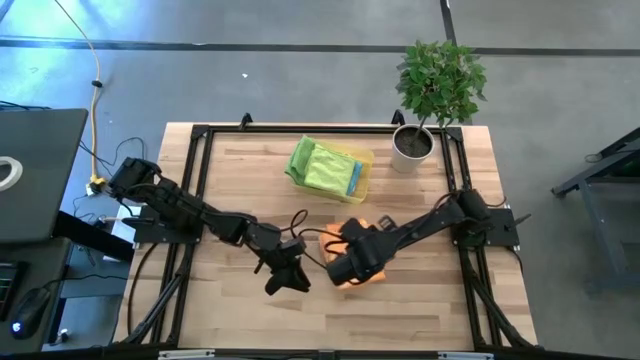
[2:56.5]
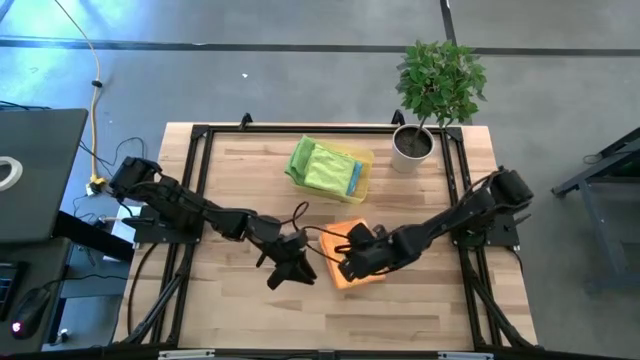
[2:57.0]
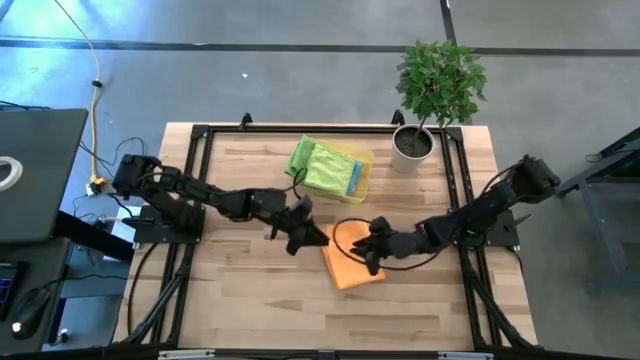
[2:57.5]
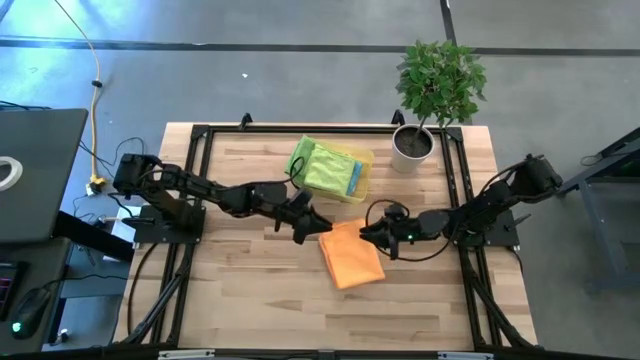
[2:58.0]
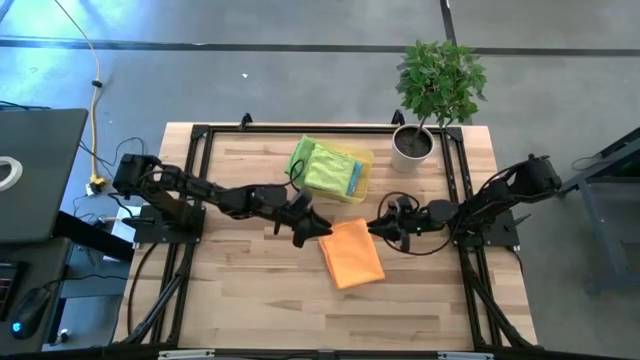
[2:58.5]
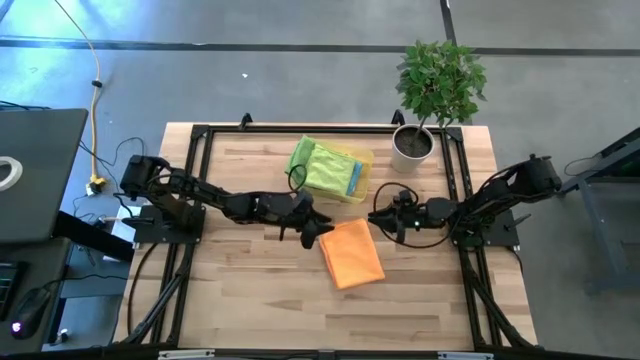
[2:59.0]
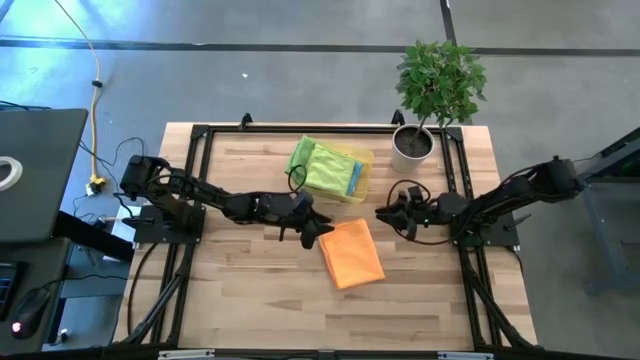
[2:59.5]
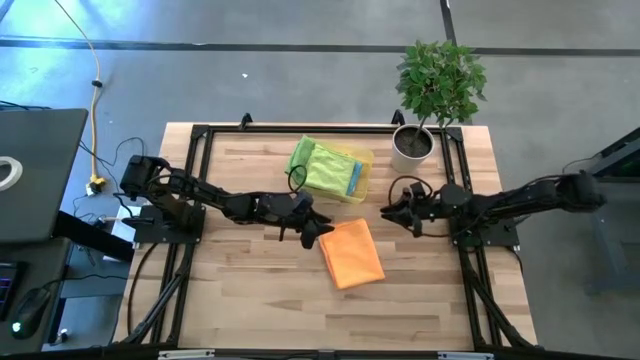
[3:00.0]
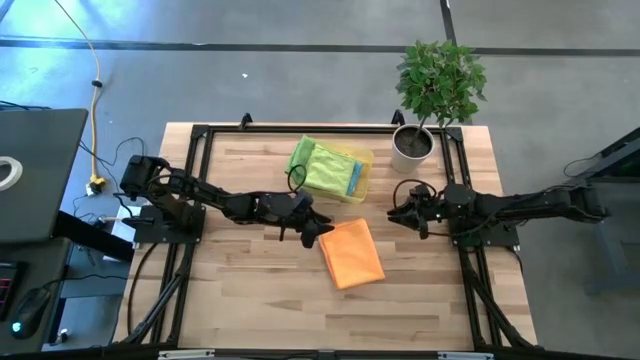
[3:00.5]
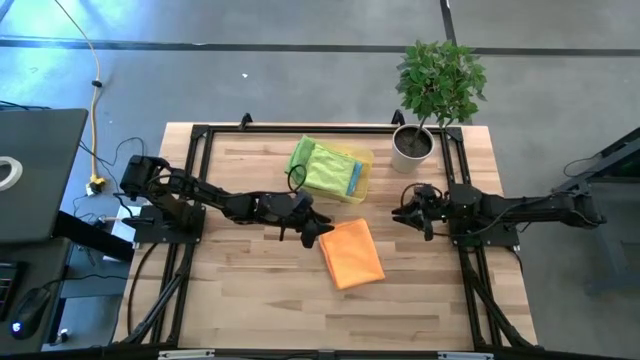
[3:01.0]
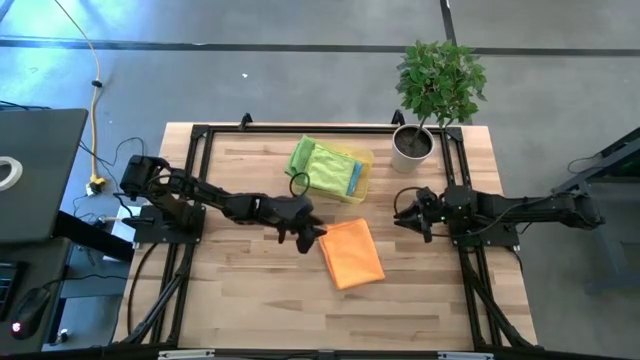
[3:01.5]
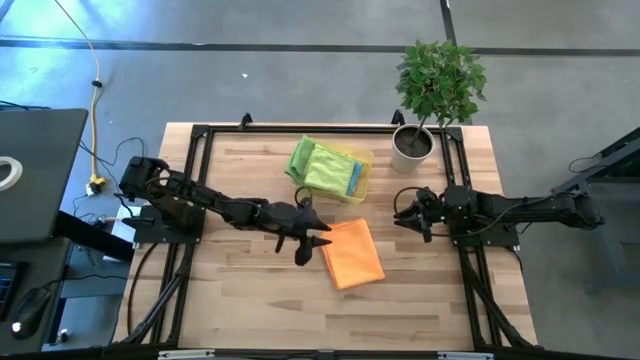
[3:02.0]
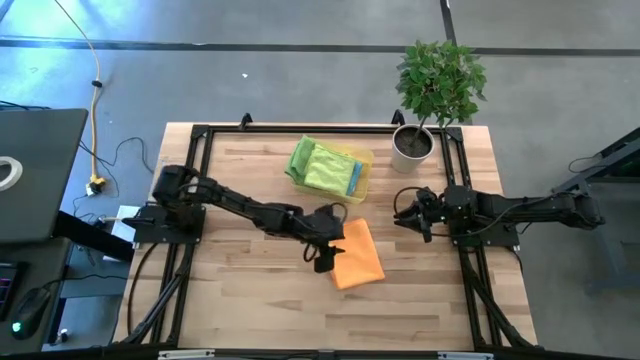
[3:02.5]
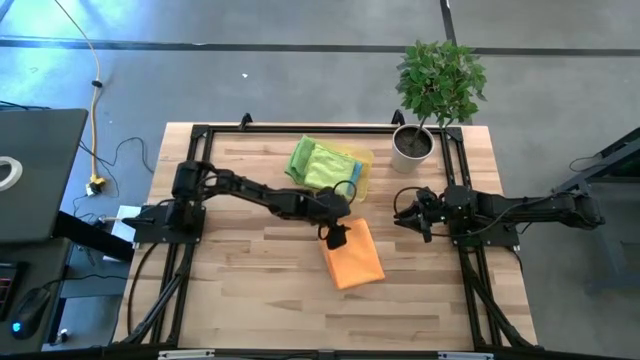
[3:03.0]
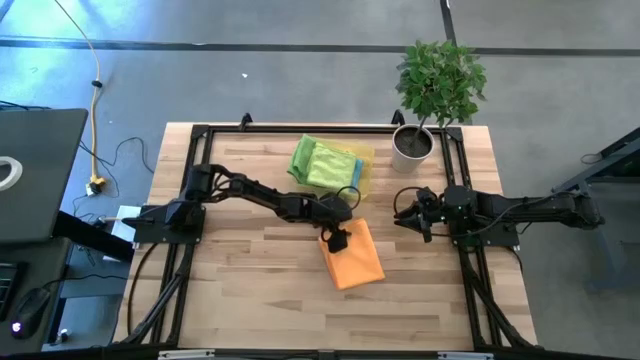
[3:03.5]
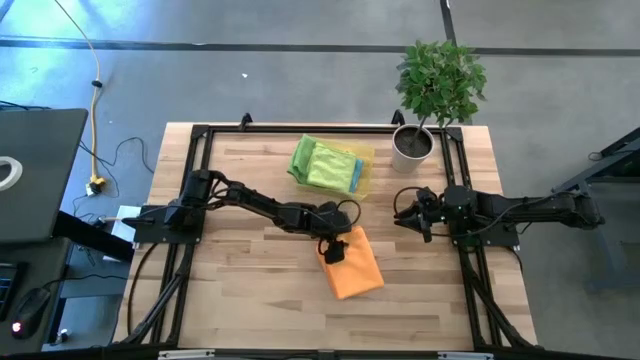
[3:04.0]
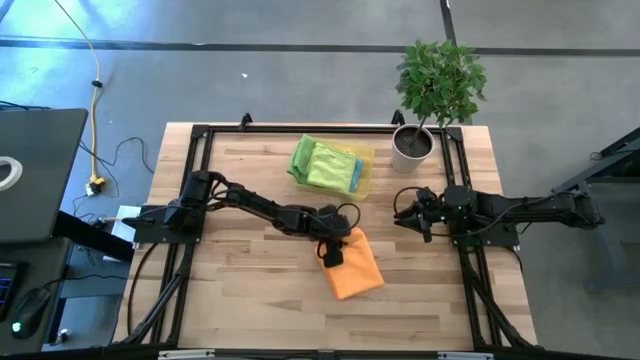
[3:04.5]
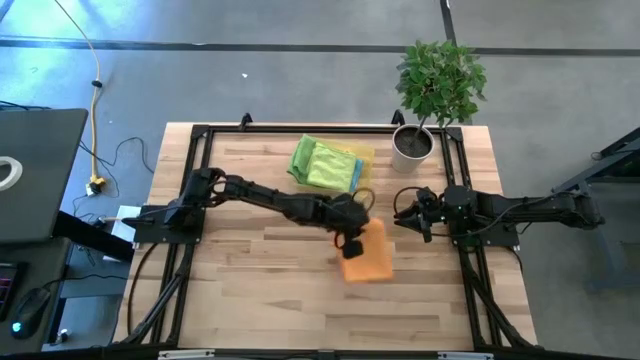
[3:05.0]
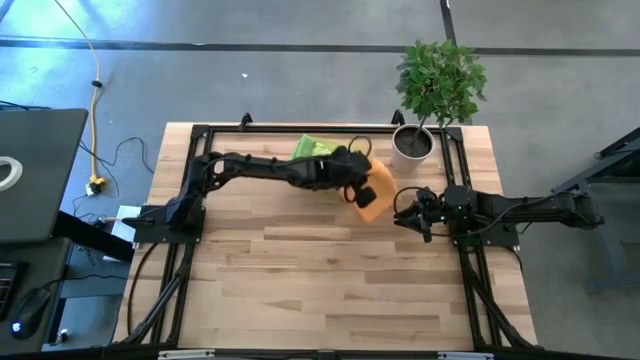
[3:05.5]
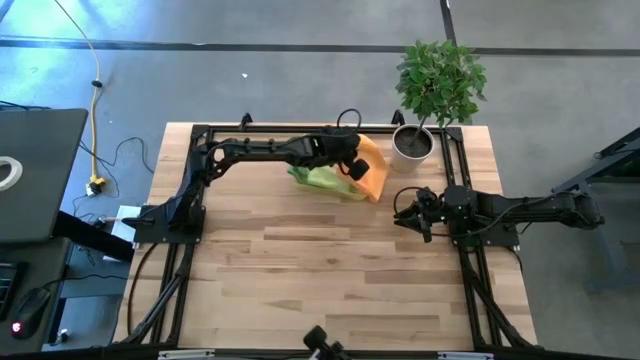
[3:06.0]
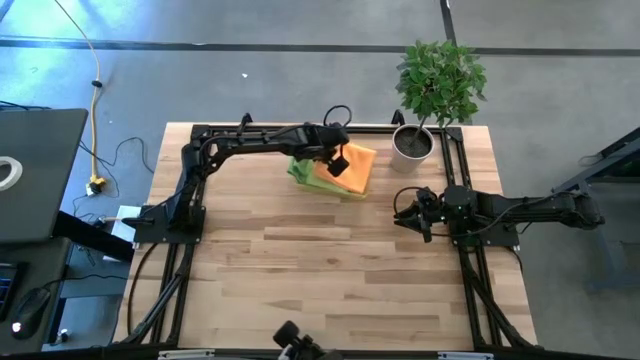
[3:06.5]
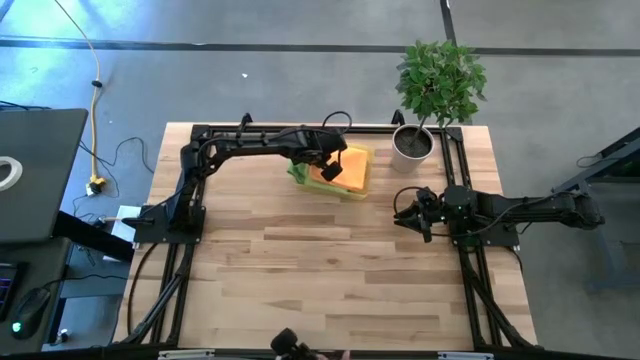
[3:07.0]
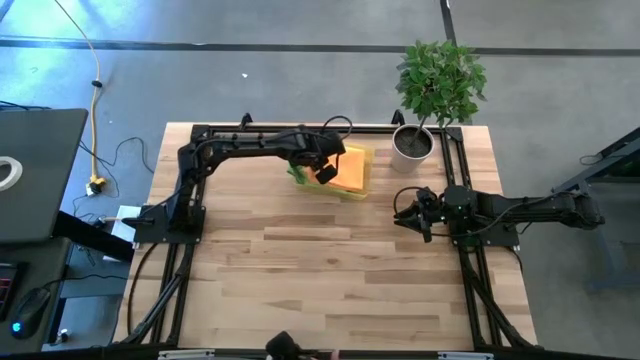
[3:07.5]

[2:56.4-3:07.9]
Task: Fold microfiber towels
Put the folded orange microfiber towel into the yellow bin

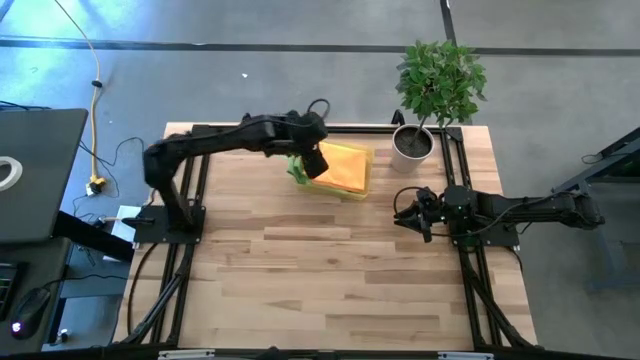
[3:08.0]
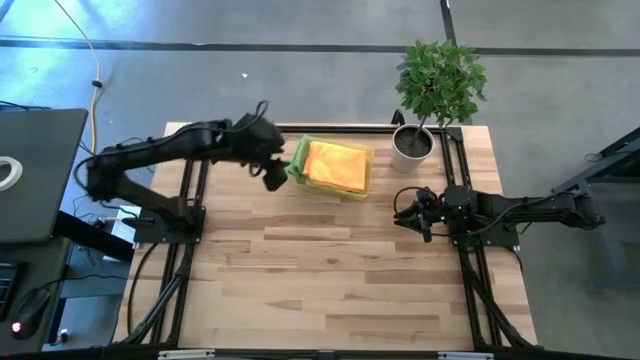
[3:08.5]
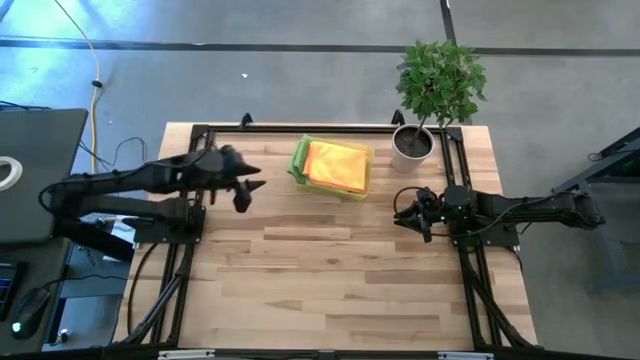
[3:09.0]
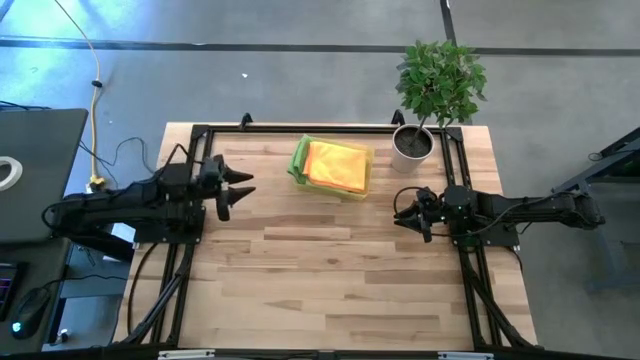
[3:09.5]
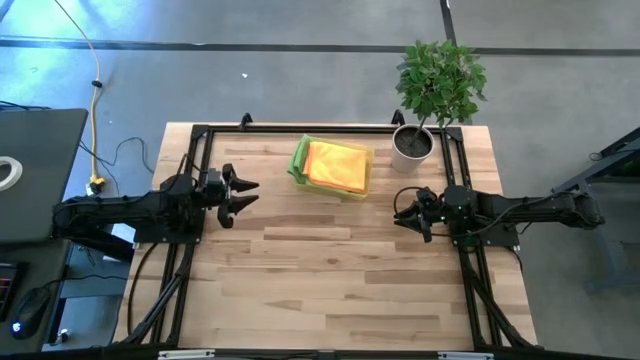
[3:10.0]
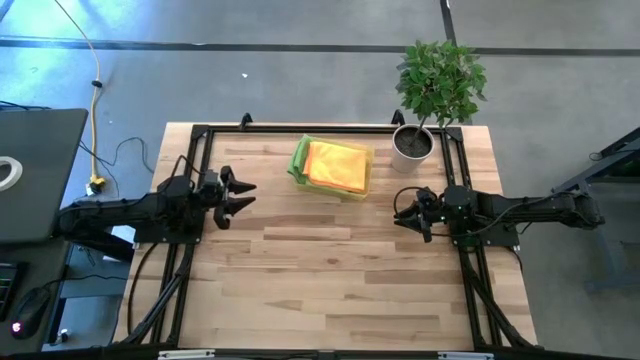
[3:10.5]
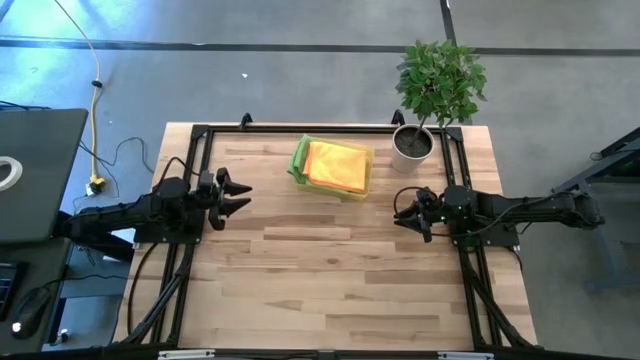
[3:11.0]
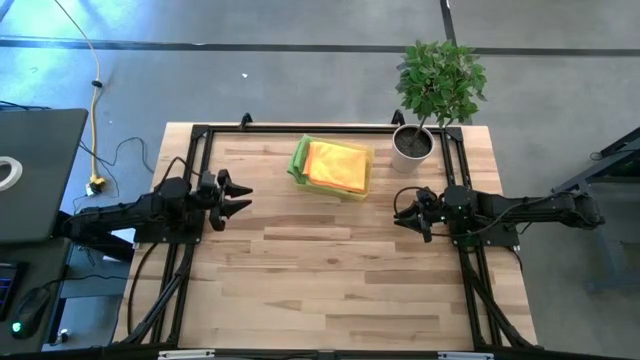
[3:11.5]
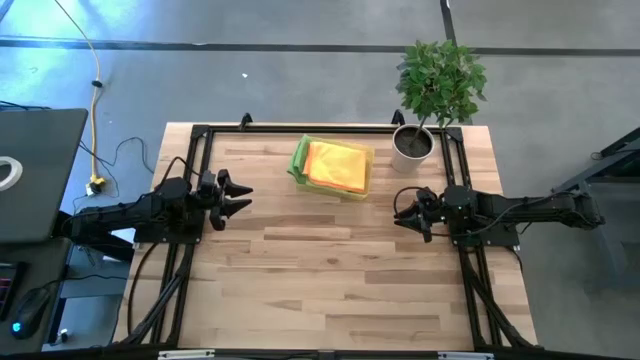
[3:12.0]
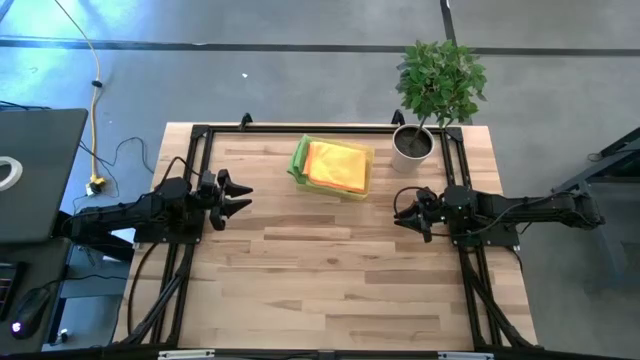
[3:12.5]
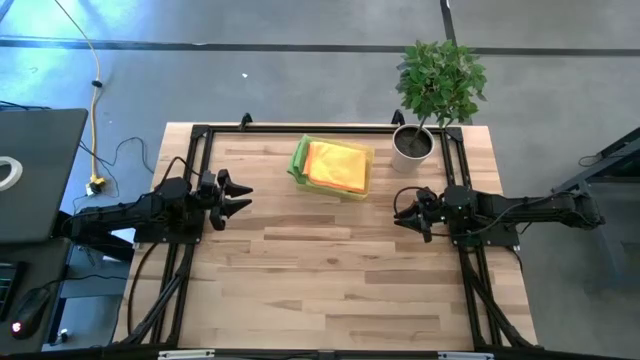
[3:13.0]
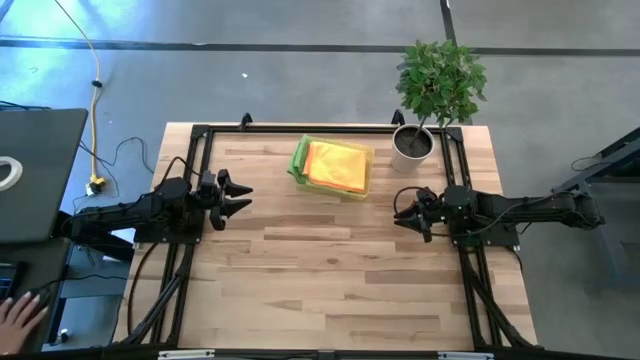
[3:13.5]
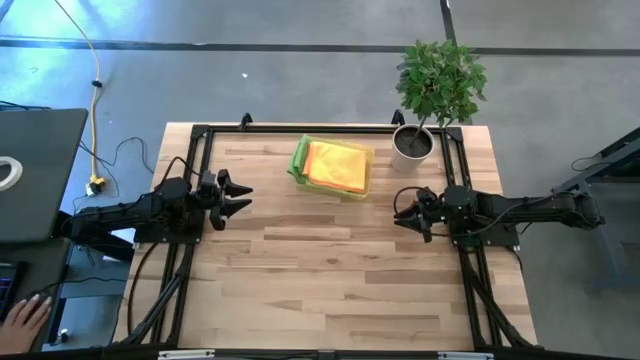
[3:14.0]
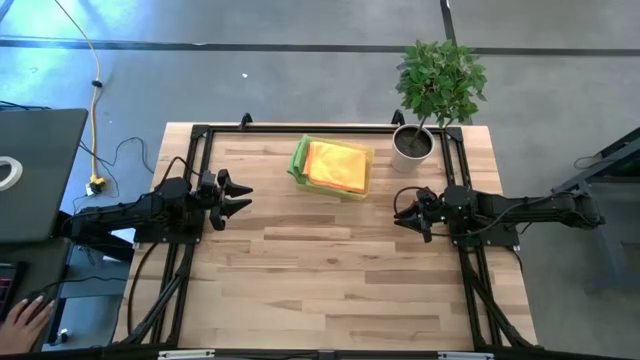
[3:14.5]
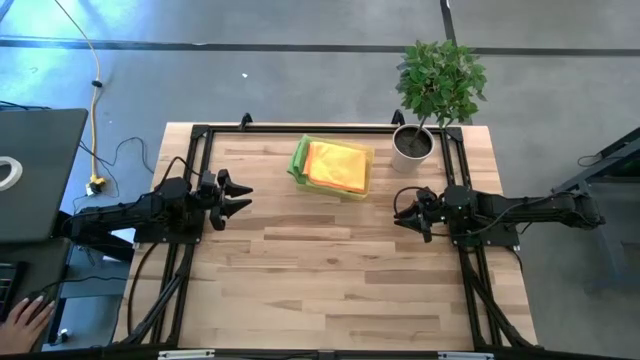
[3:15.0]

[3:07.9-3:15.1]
Return to home position

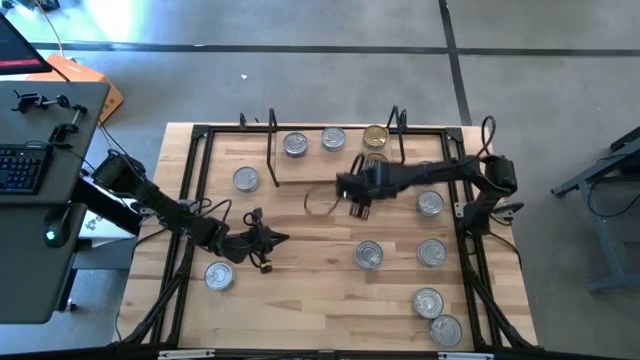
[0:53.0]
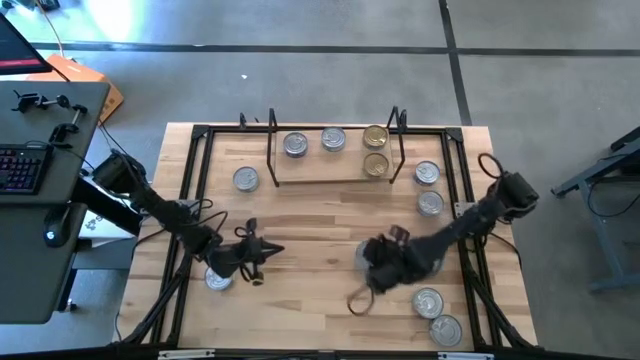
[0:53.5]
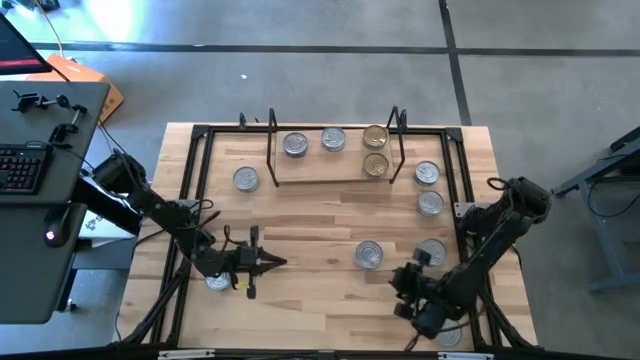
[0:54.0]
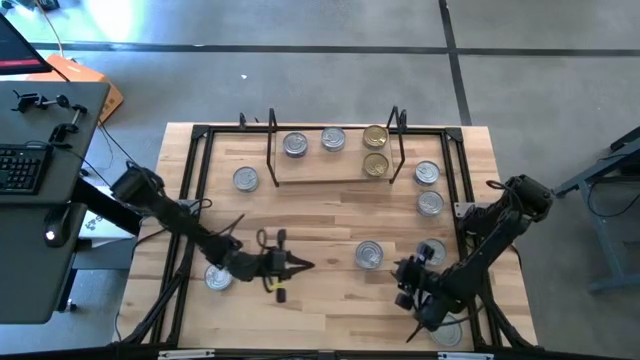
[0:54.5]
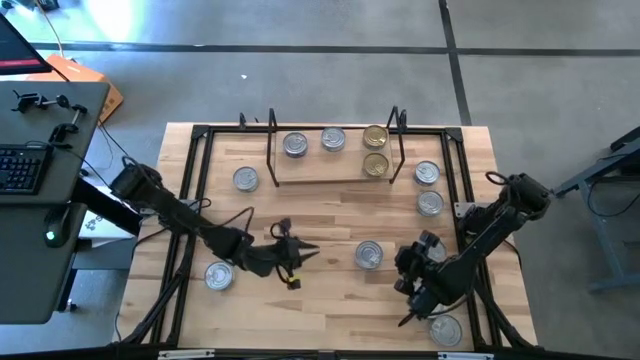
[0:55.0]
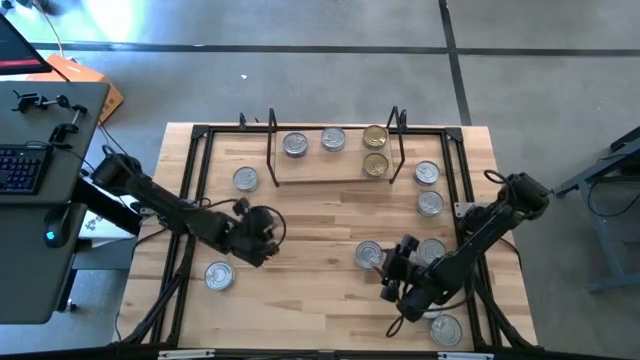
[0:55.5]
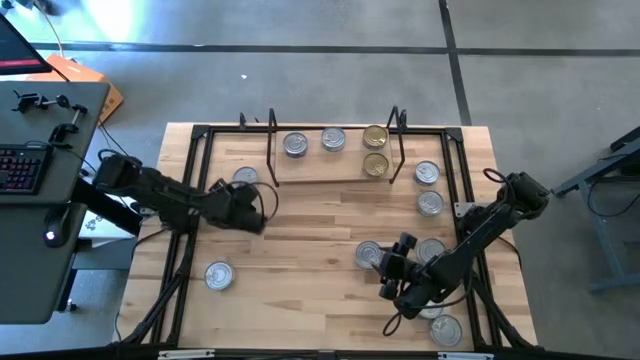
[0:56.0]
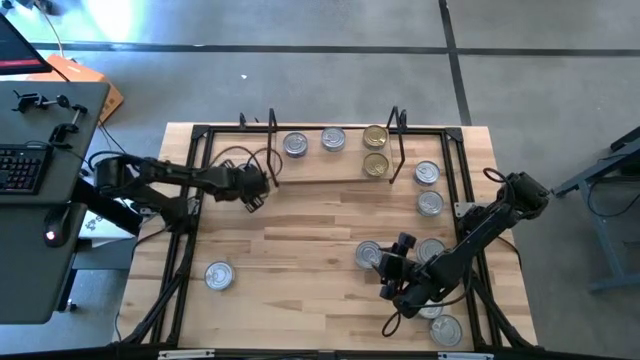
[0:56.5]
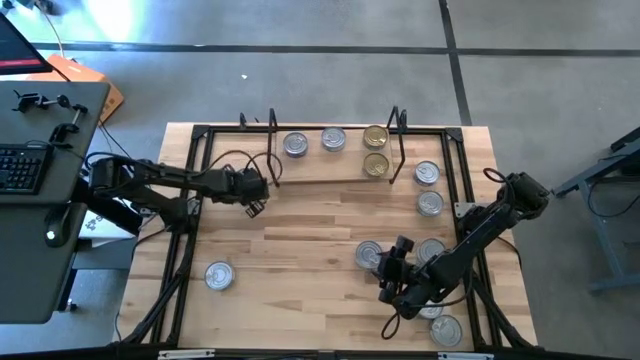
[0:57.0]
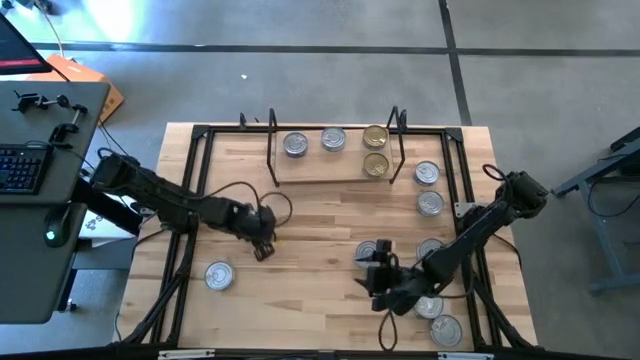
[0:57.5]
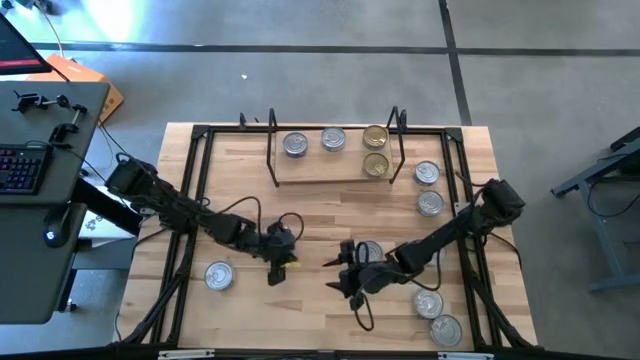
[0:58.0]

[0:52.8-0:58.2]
Task: Stack canned seafood by type on shelf
Put the light blue tuna can on the shelf and align it with the other light blue tuna can
